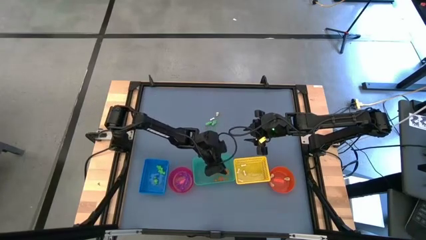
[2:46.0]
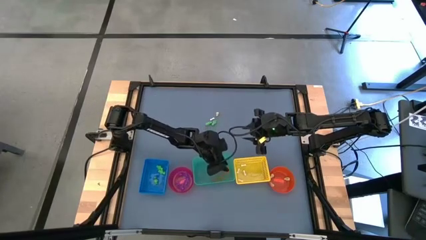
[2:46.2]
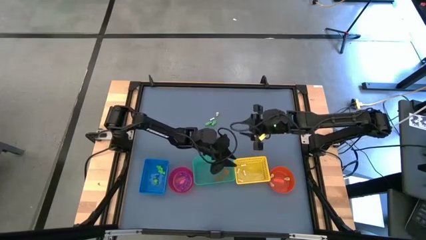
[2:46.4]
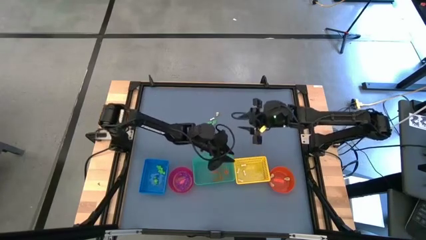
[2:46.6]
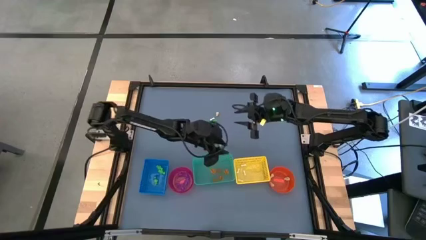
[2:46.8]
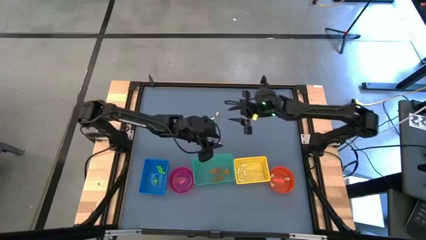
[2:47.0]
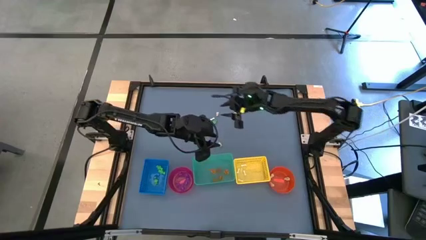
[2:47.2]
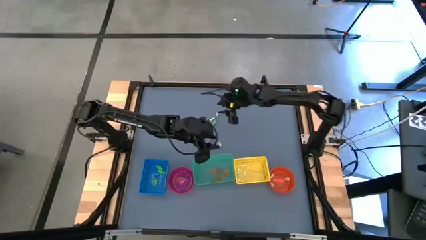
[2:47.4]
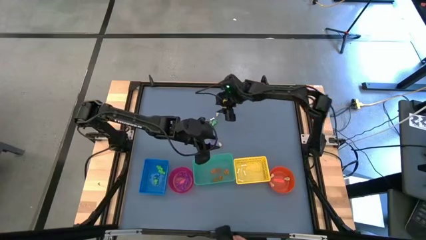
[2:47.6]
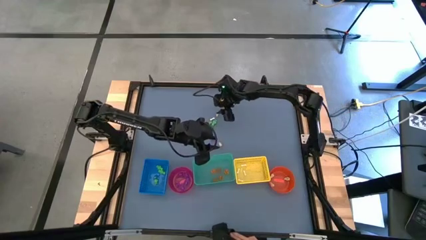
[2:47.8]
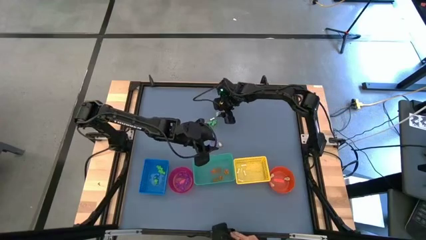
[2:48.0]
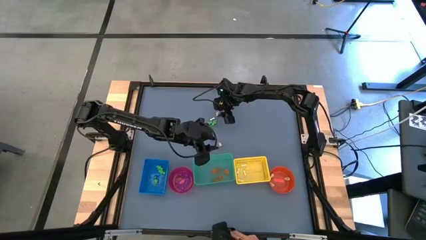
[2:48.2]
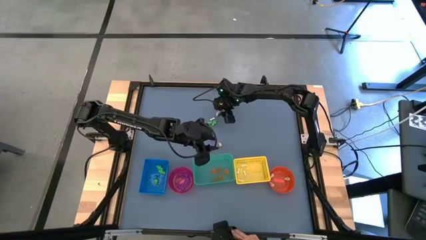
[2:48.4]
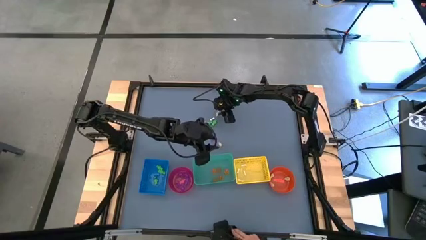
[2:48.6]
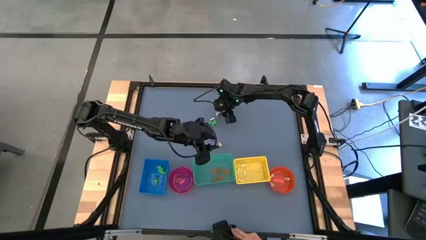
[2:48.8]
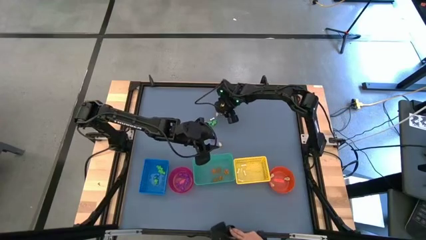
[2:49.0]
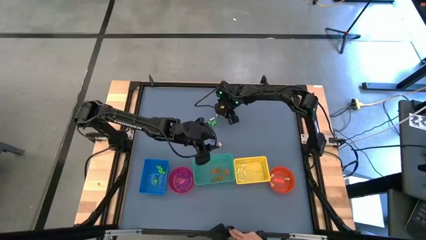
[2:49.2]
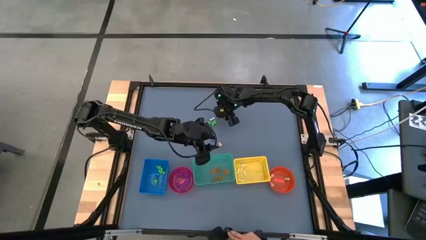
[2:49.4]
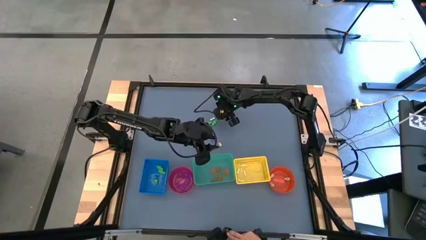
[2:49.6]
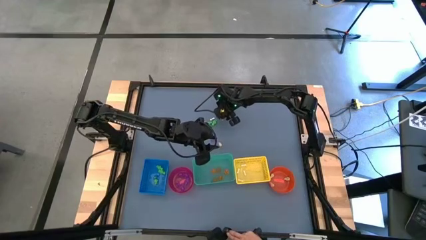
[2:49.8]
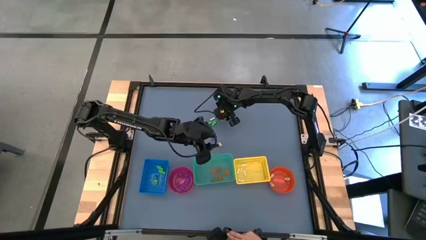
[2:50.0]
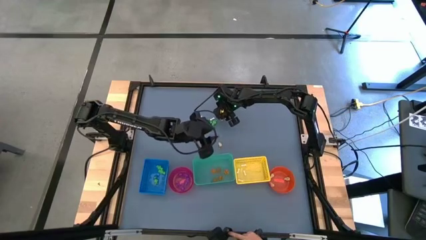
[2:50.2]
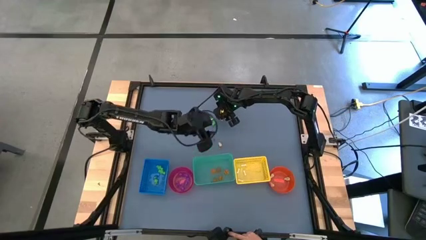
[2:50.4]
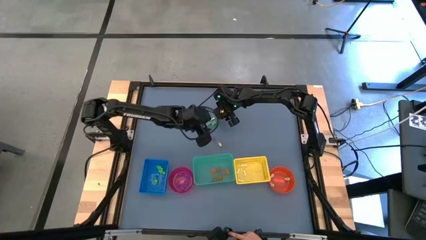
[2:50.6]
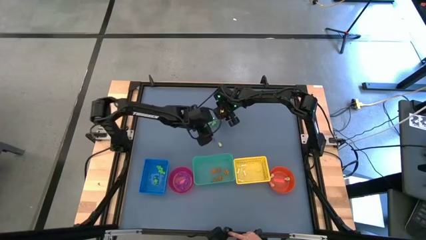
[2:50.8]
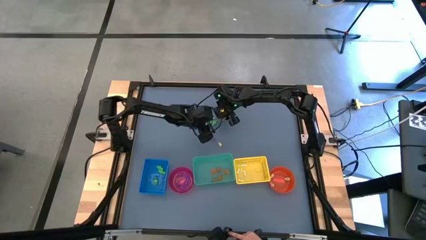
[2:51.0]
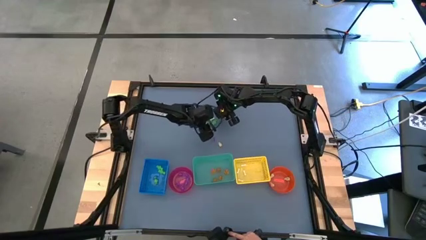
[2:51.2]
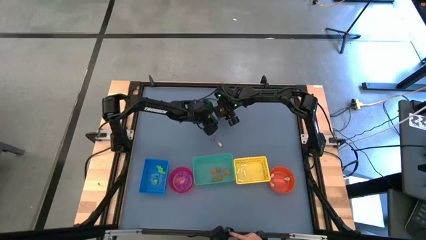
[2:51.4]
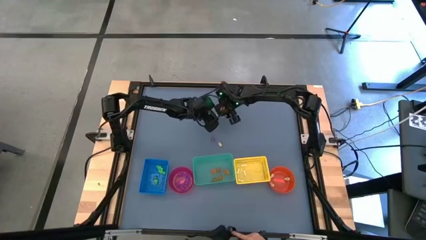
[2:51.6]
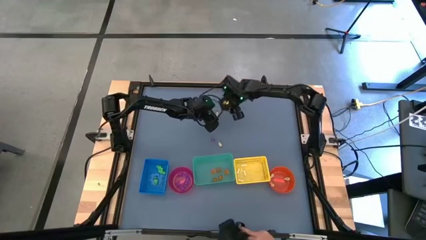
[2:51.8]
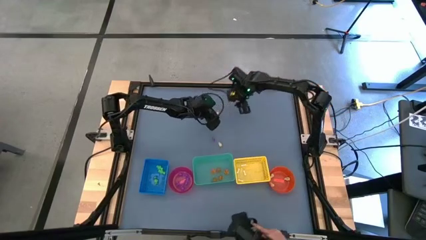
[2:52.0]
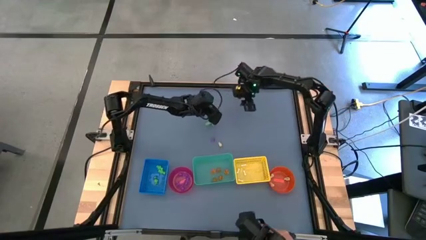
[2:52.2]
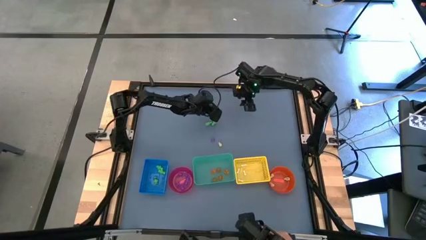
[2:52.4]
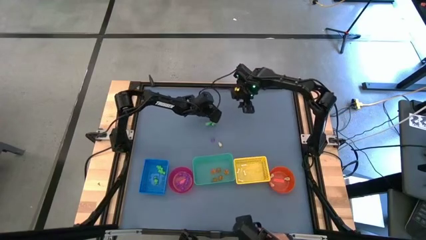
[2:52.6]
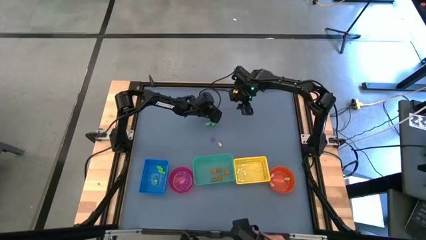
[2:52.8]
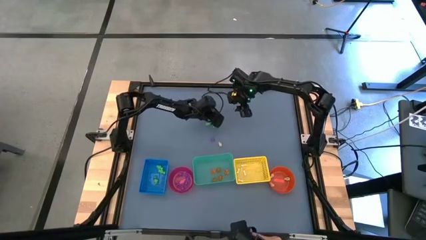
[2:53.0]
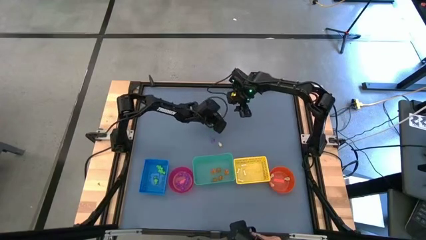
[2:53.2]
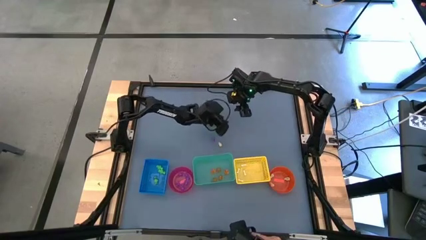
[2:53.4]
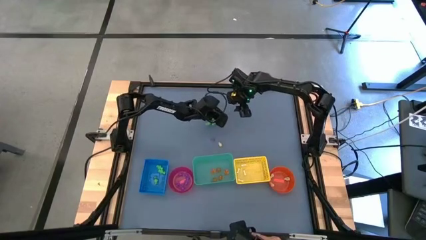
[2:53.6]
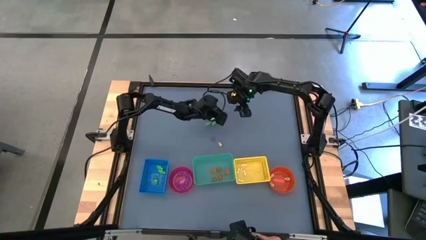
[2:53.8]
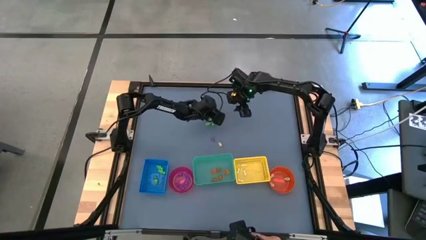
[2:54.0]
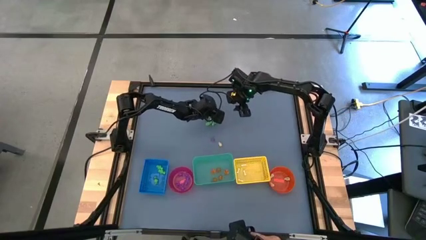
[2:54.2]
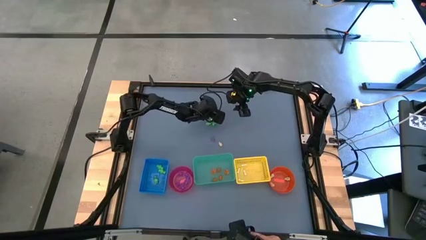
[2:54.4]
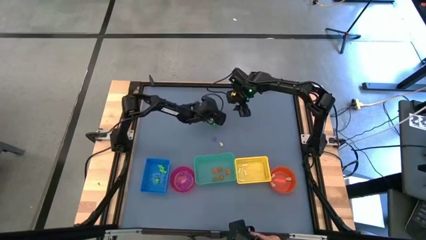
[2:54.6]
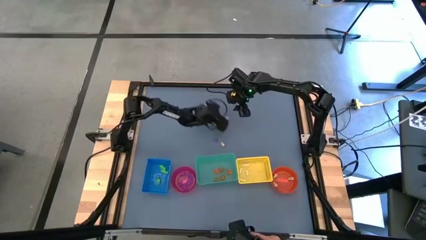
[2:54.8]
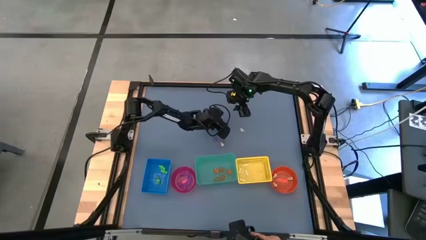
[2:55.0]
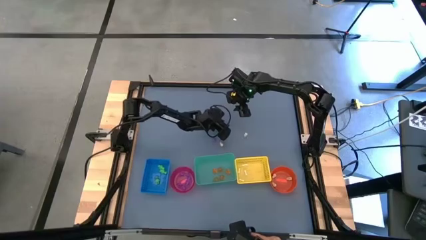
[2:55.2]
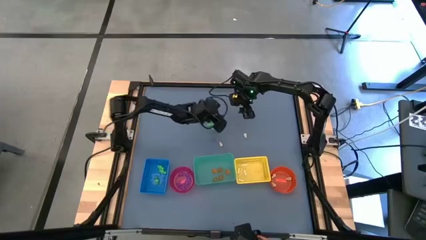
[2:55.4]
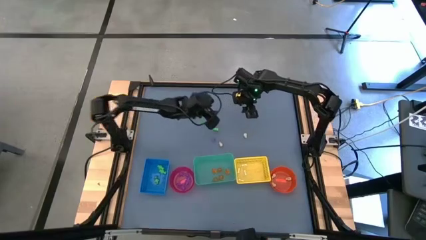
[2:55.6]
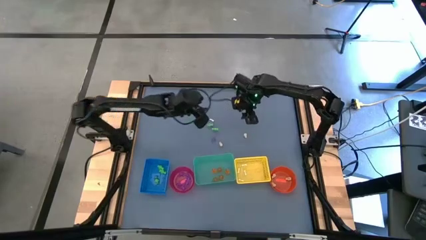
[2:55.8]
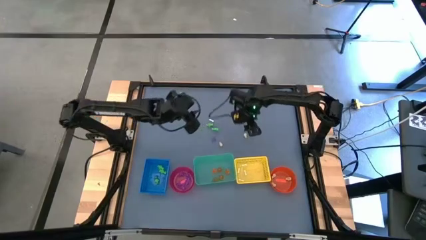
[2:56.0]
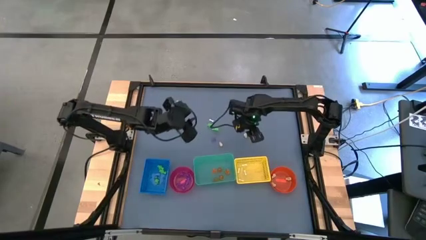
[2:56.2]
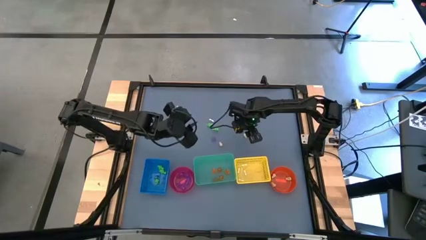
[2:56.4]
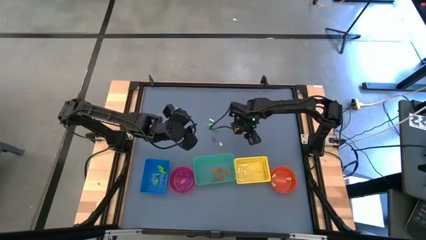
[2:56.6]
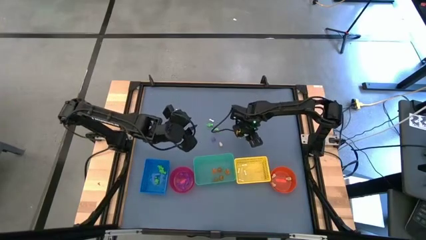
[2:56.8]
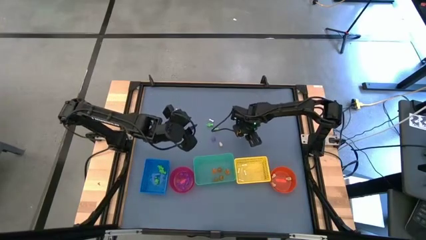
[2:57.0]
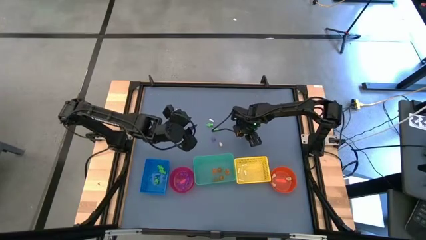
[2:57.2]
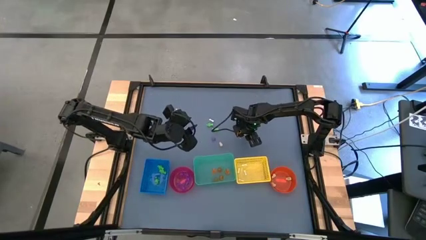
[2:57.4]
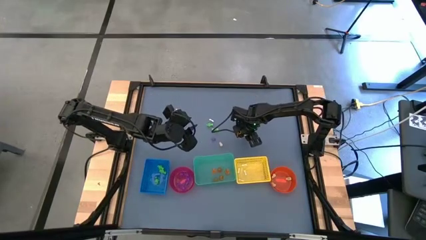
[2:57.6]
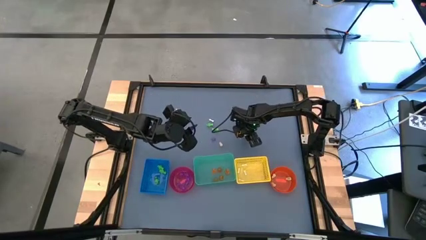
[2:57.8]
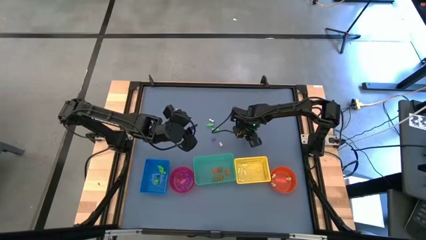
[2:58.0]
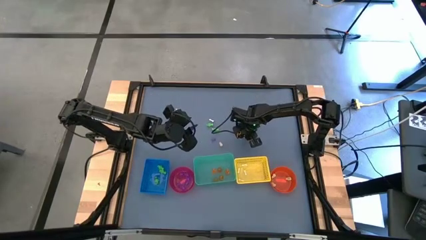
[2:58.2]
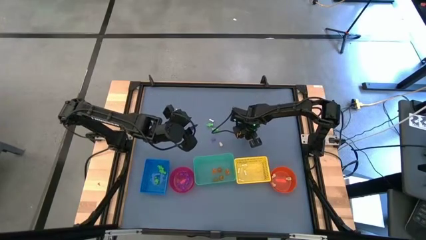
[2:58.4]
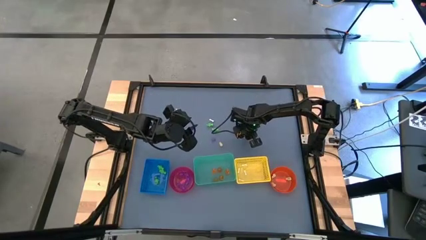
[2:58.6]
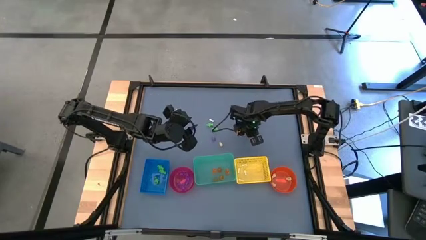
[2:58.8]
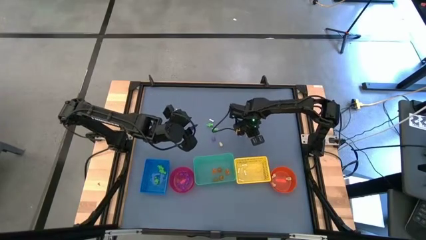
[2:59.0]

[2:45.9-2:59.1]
Task: Sort Halloween decoration
Put the white skull toy into the orange bin

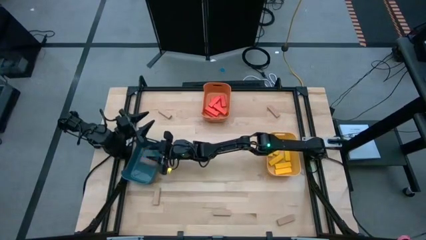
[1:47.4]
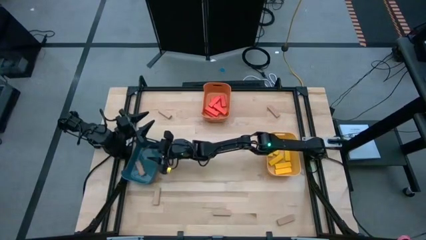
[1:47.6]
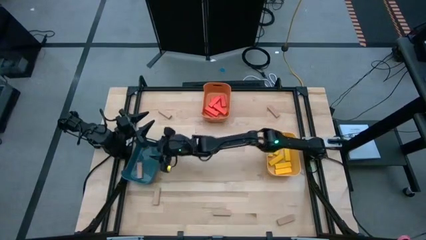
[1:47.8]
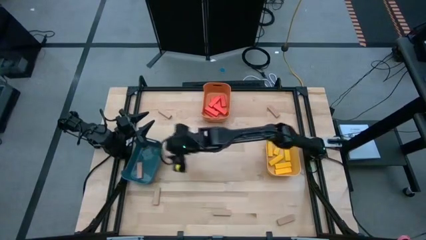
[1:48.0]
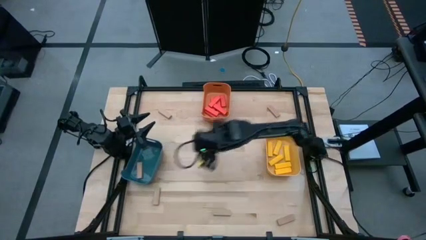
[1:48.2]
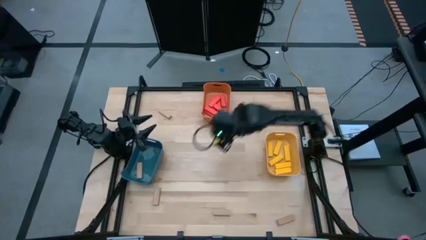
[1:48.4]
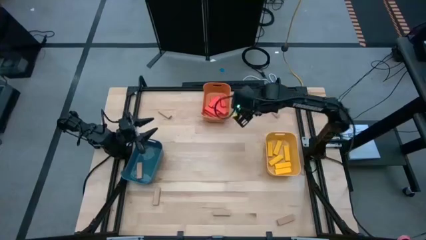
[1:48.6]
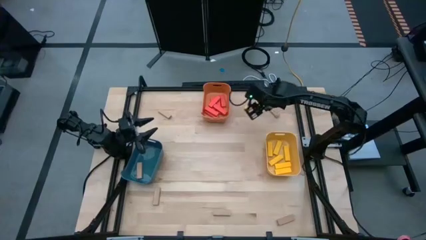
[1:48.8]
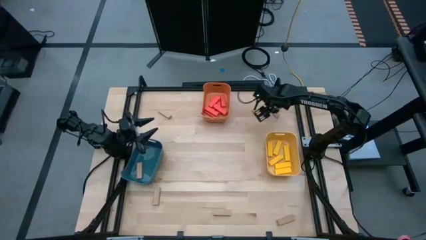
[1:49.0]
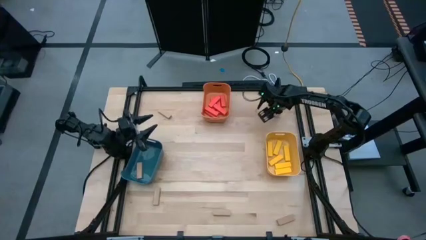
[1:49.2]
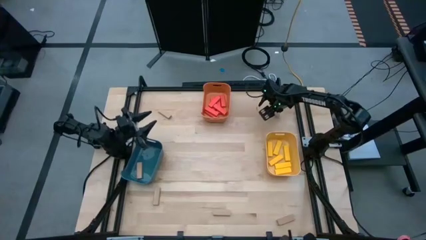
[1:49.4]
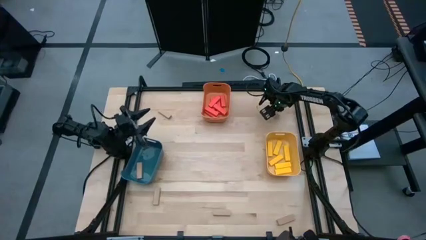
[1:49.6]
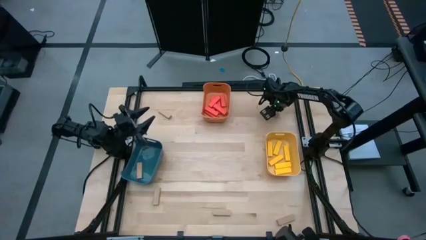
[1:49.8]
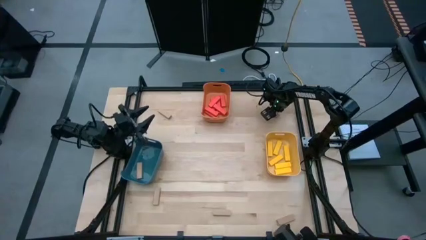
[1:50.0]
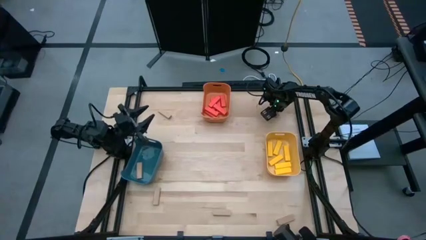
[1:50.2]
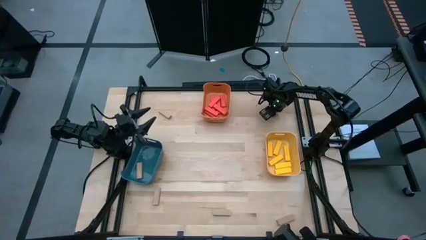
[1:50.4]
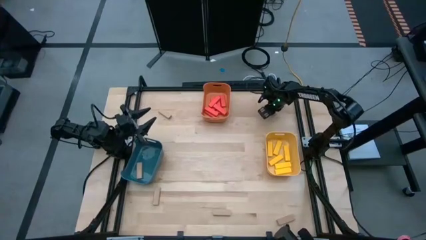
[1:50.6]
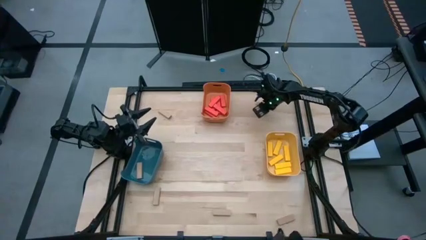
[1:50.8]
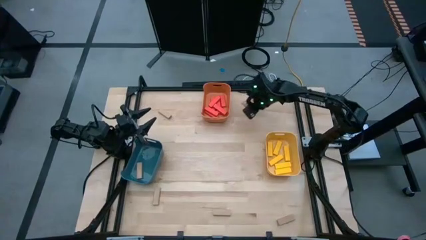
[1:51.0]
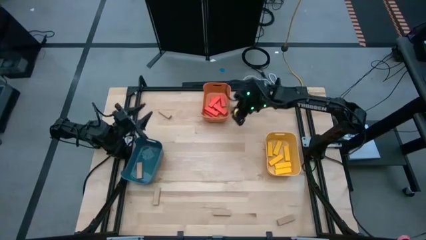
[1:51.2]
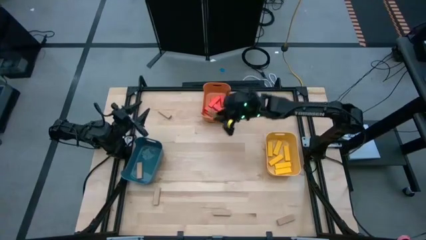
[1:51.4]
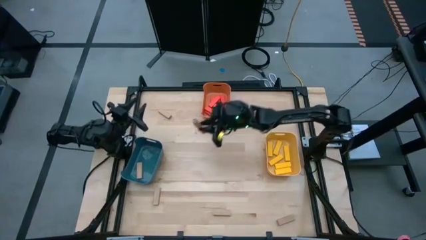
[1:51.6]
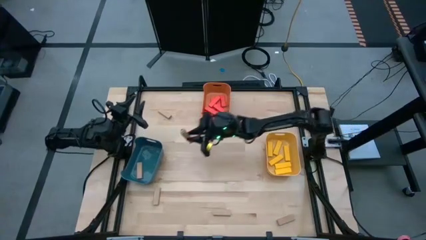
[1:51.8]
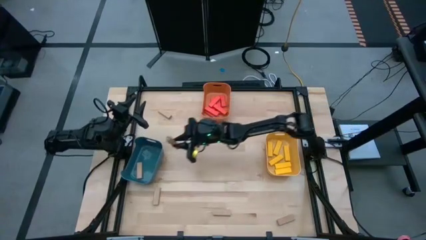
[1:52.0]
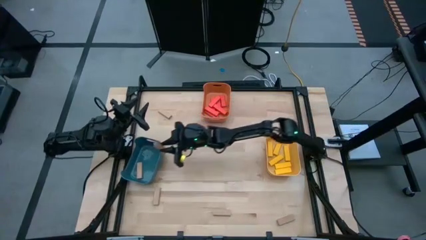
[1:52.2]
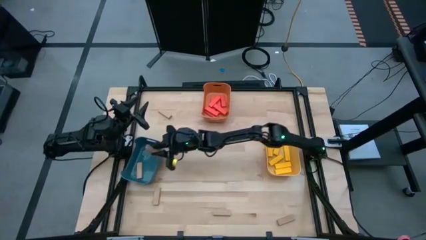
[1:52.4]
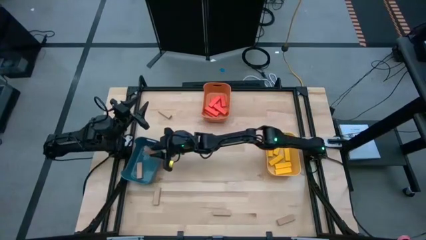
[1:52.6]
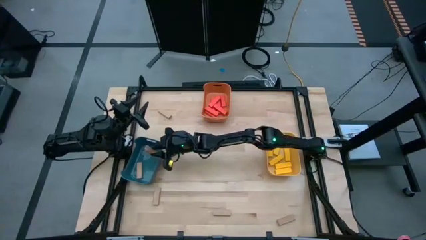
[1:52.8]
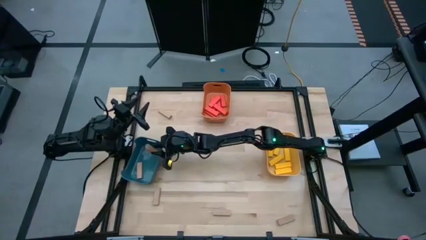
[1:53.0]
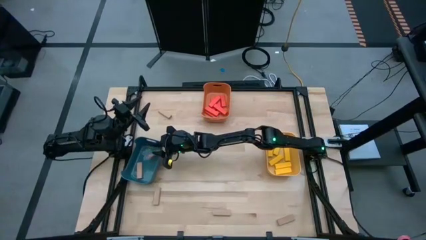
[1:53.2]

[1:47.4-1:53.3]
Task: Sort blocks
Put the top right brown block into the blue bin
